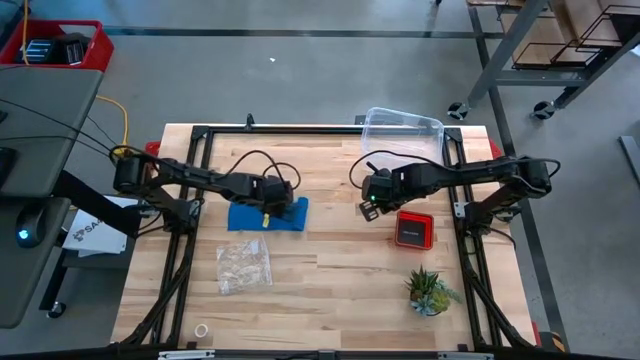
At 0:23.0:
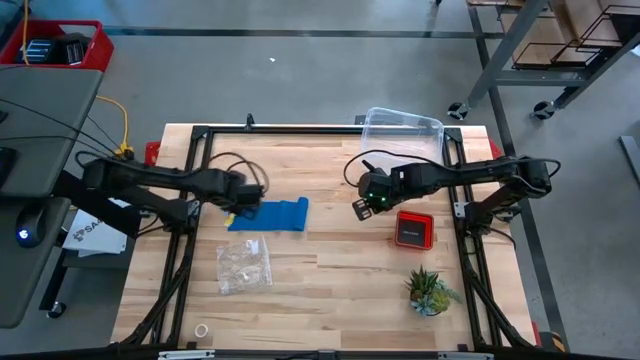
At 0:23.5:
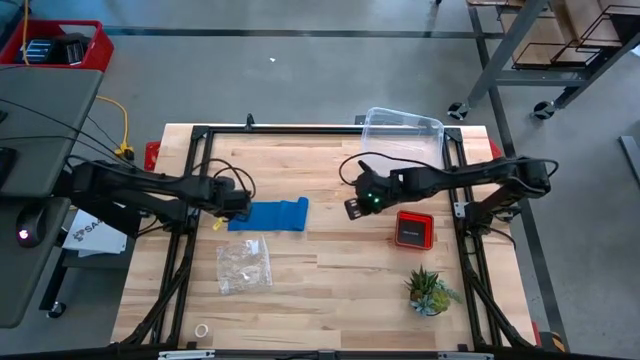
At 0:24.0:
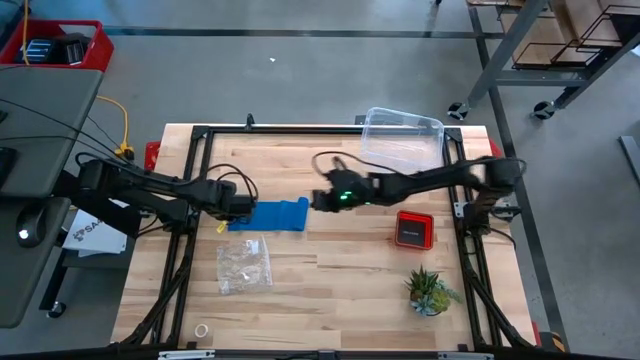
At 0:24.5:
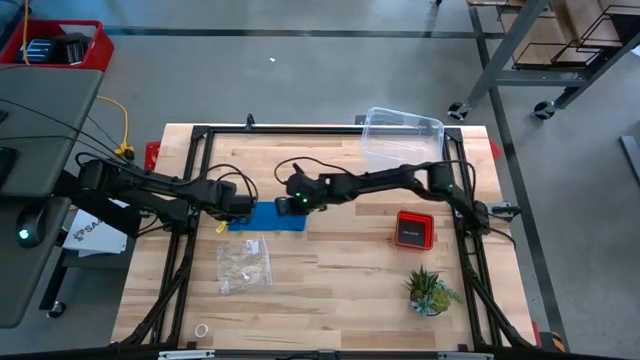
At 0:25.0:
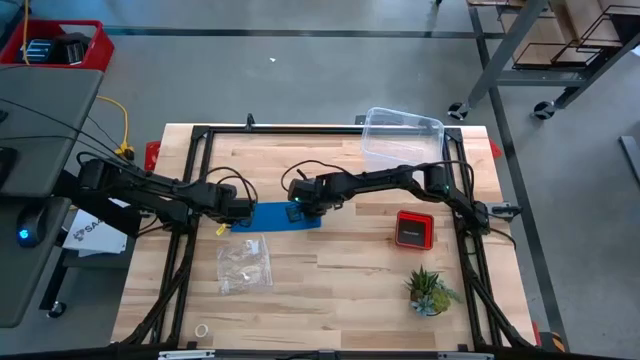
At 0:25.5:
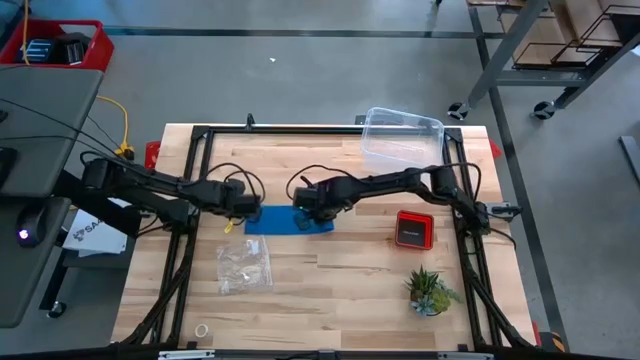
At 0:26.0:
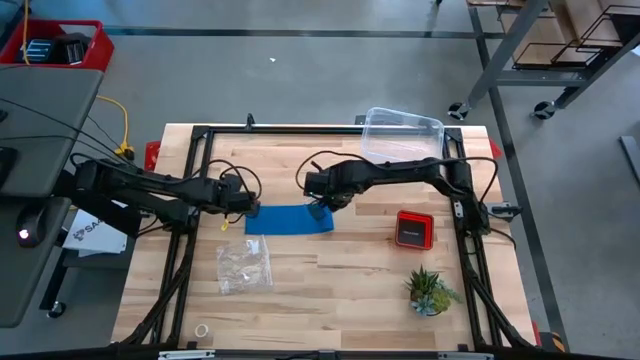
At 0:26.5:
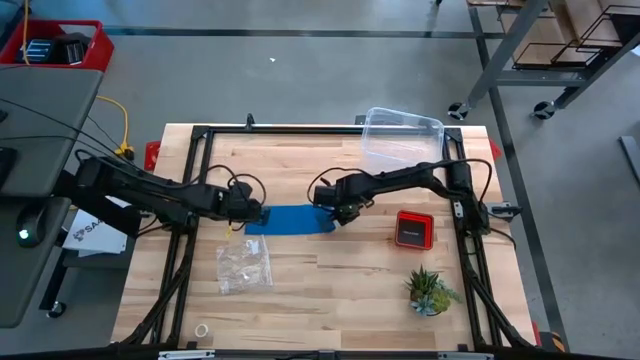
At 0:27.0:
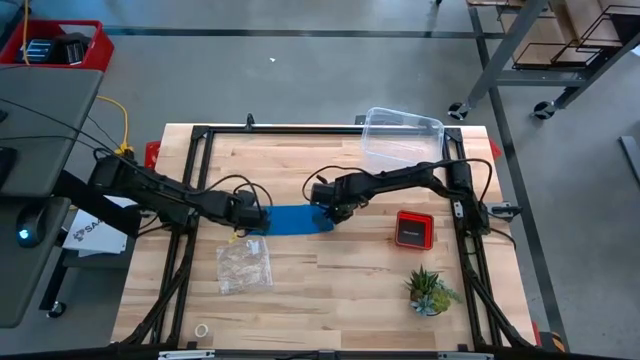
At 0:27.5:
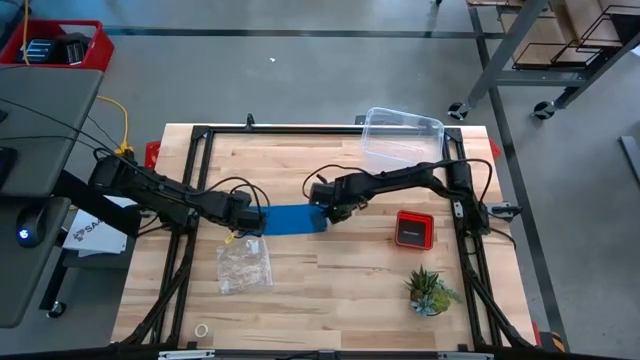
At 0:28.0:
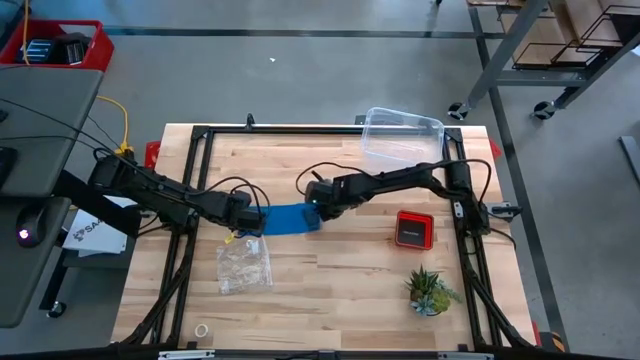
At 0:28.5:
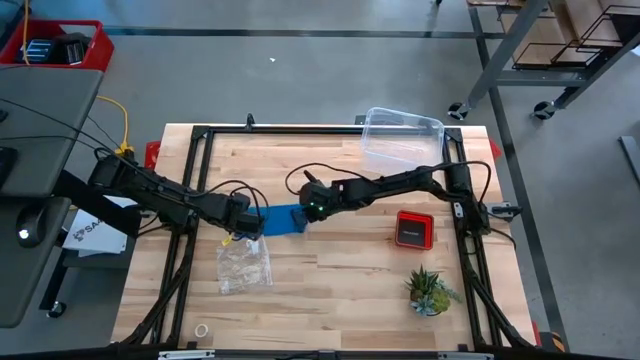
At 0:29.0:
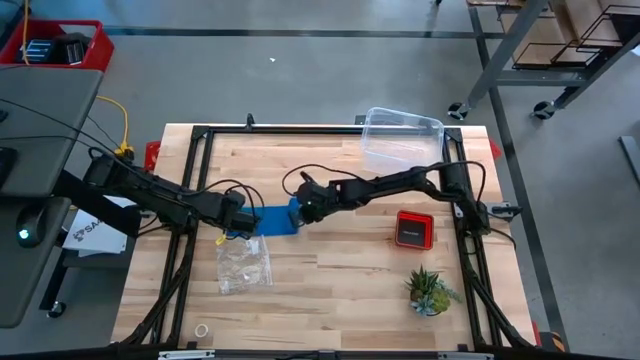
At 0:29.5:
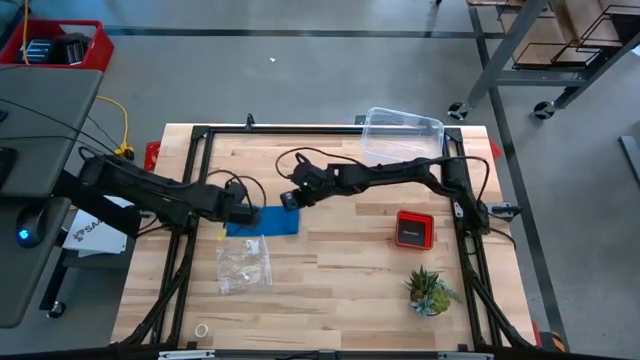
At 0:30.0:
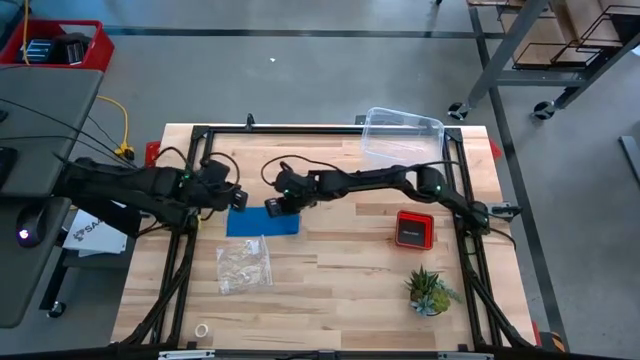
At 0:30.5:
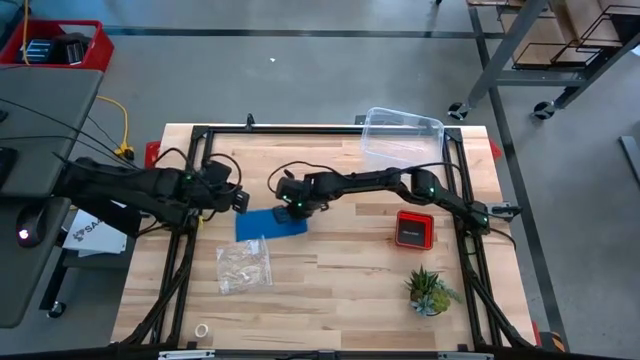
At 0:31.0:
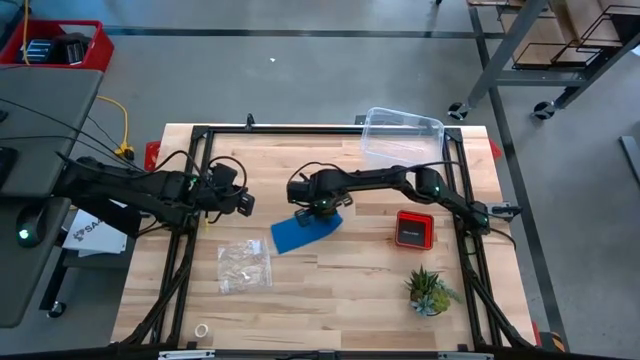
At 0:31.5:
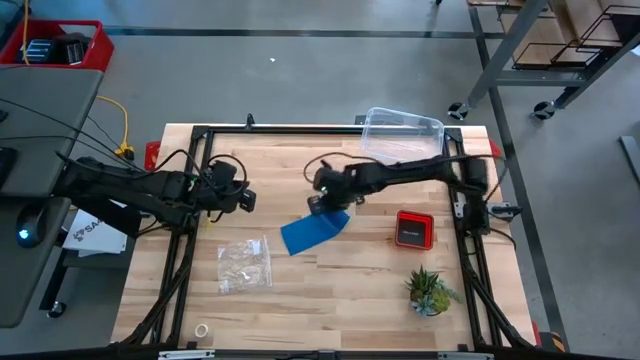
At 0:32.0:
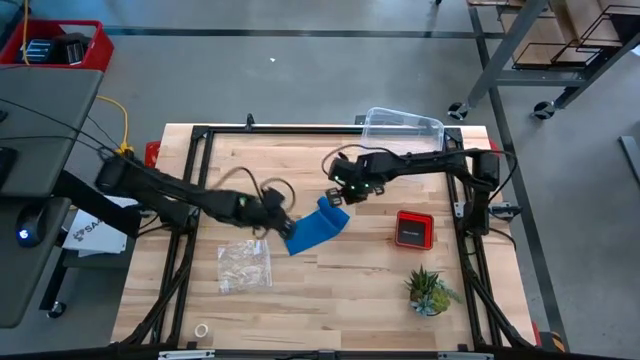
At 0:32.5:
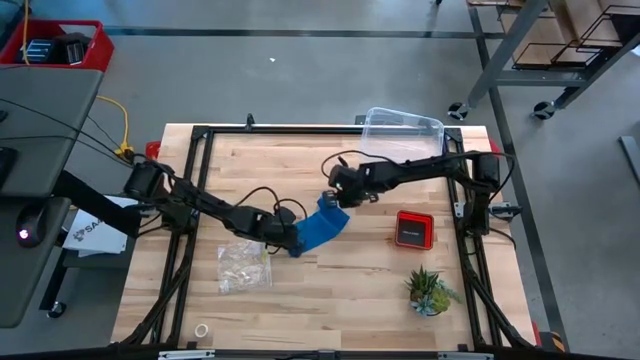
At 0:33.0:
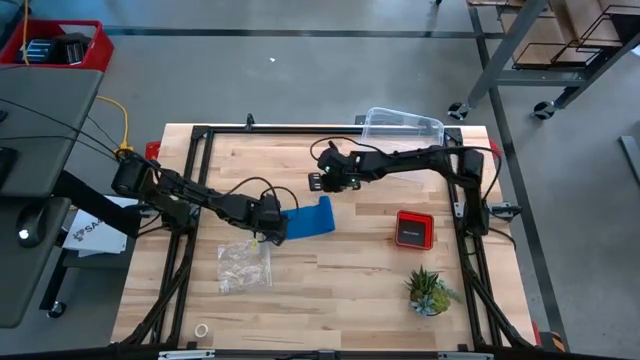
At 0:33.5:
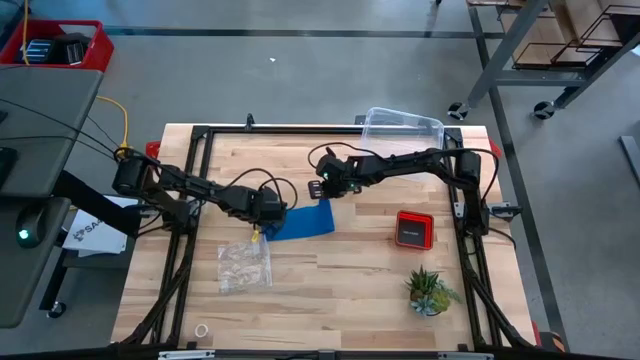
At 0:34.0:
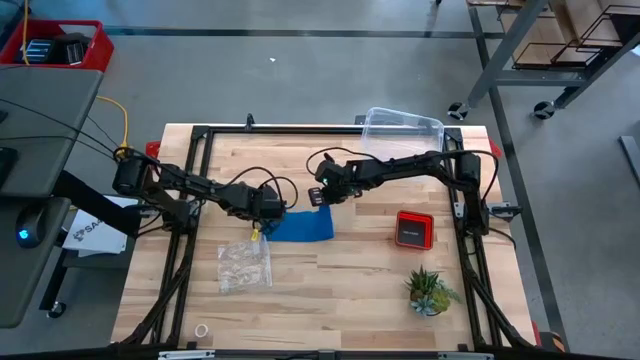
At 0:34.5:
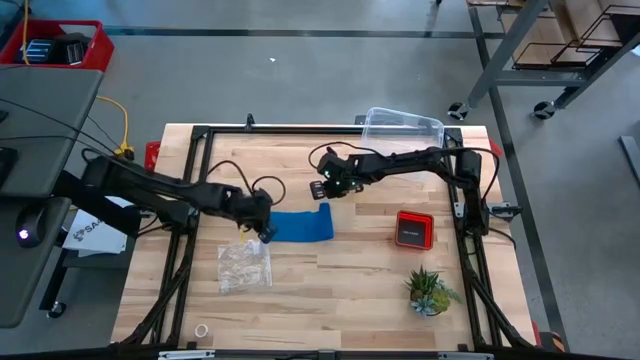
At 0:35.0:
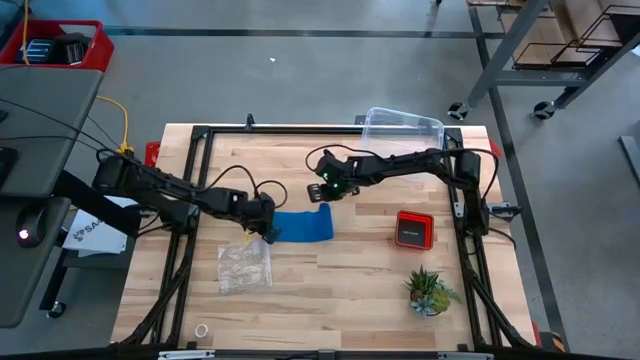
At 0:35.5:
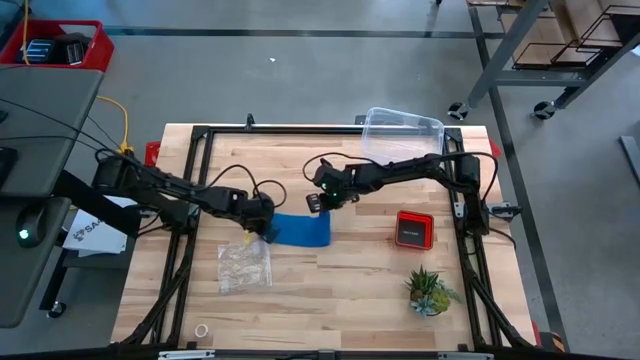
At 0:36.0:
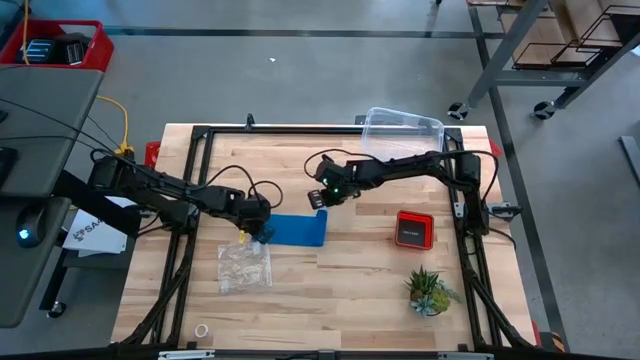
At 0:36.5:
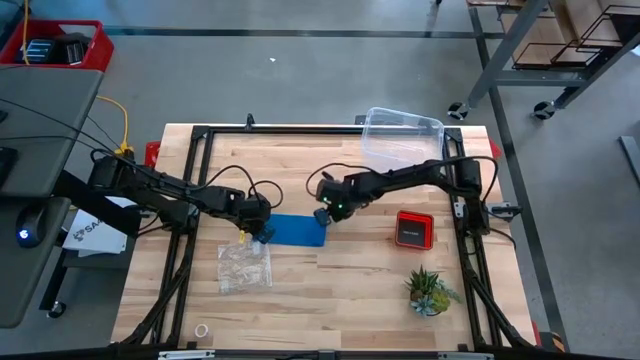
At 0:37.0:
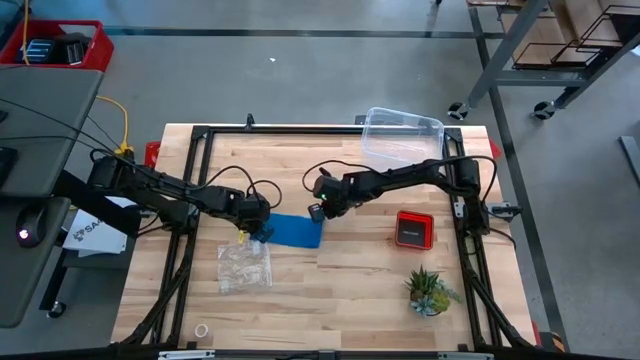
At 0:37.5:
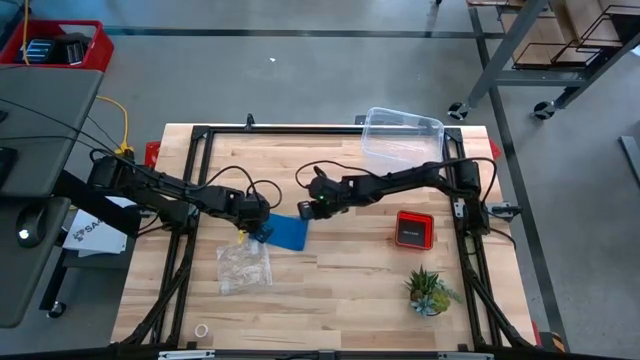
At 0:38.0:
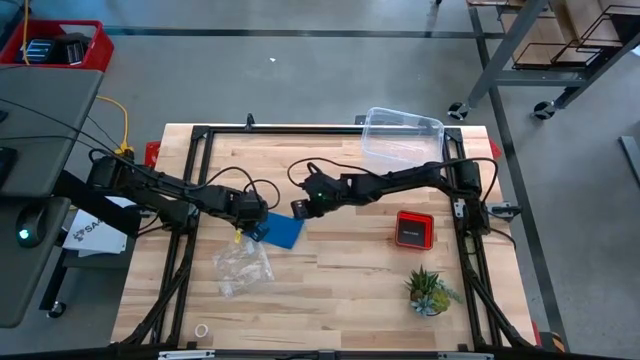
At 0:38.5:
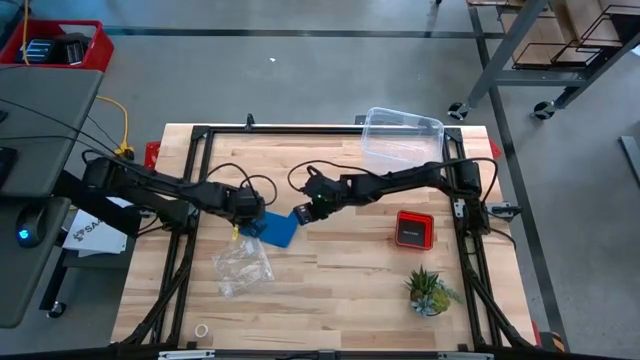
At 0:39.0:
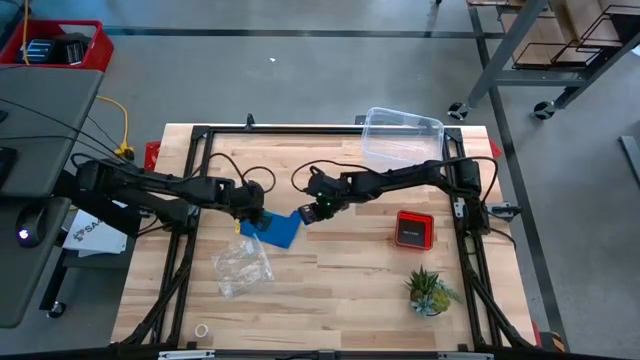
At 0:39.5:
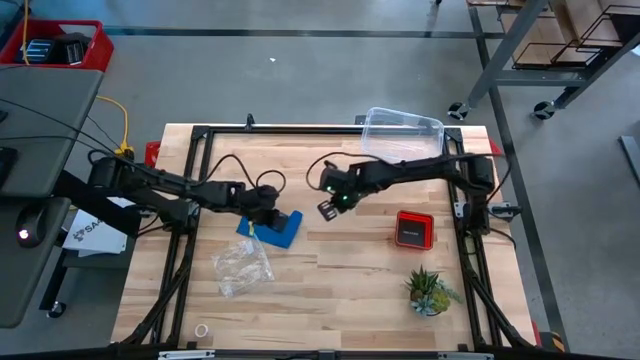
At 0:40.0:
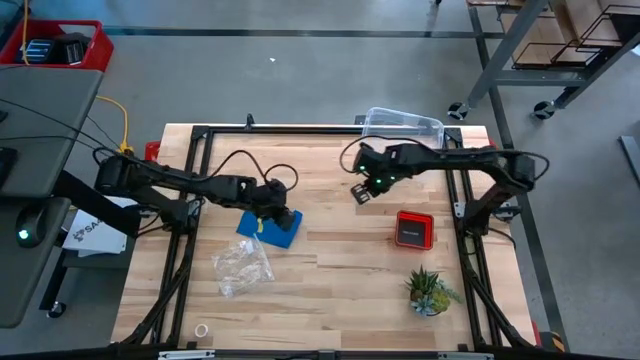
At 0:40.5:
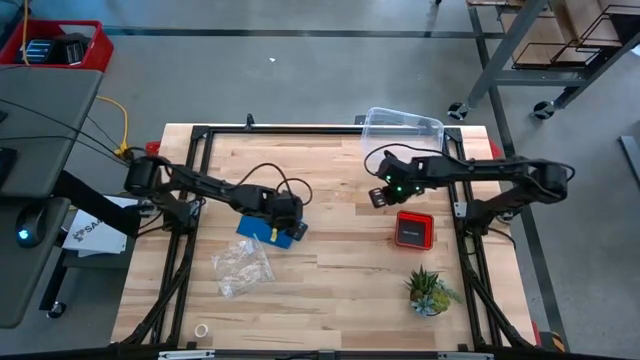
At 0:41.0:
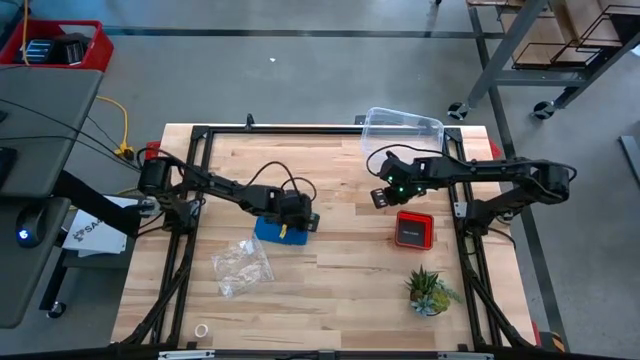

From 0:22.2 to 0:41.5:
Task: Roll bandage
Roll the blue bandage

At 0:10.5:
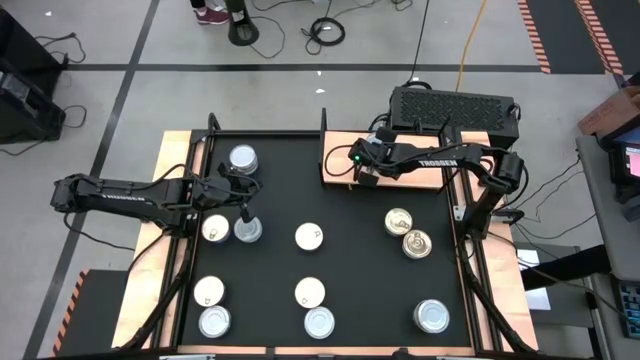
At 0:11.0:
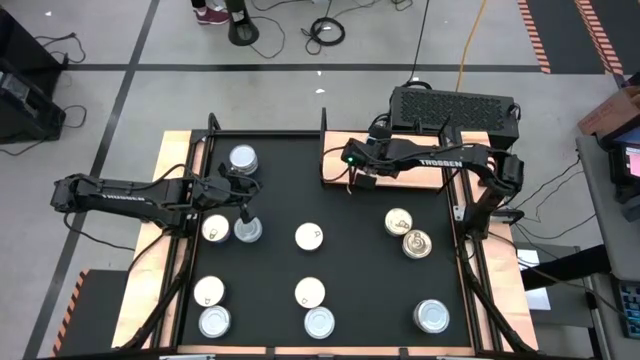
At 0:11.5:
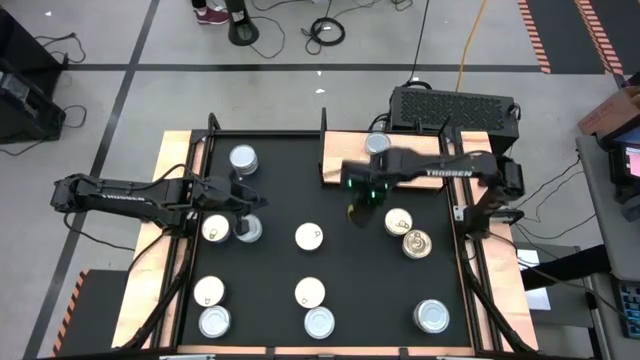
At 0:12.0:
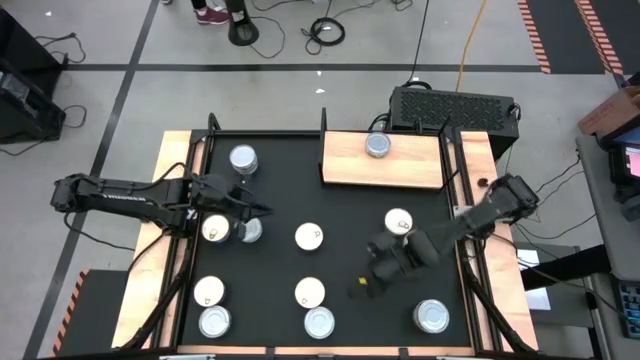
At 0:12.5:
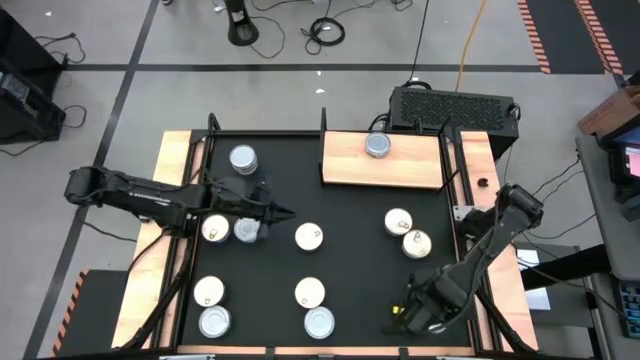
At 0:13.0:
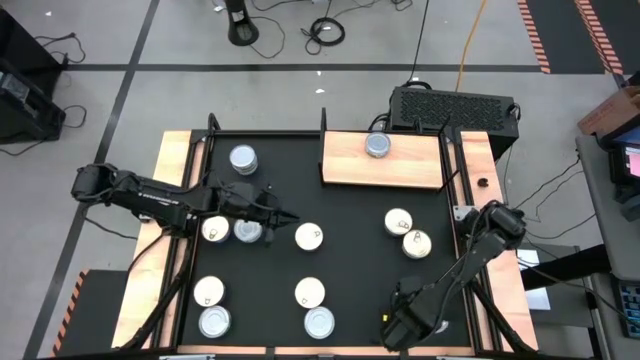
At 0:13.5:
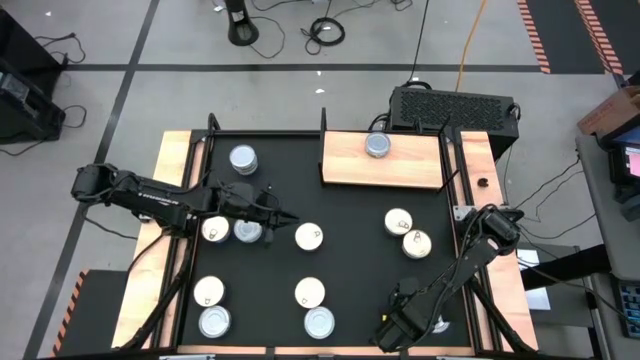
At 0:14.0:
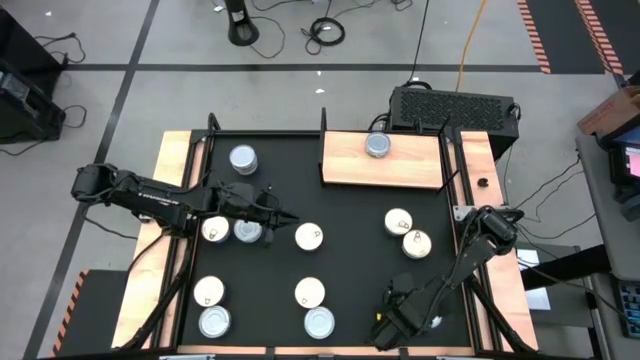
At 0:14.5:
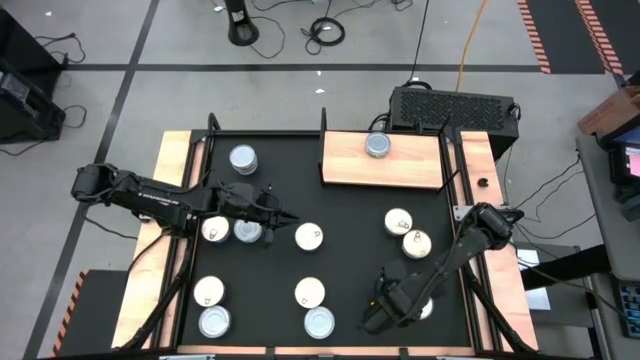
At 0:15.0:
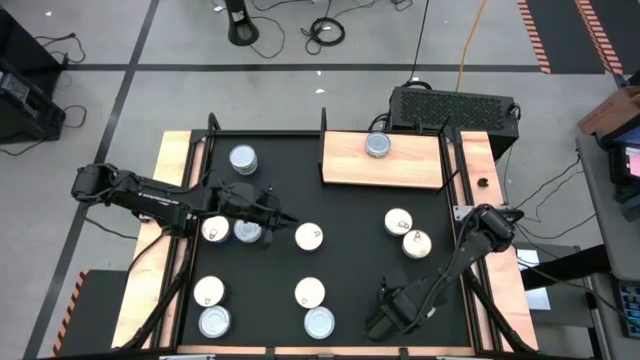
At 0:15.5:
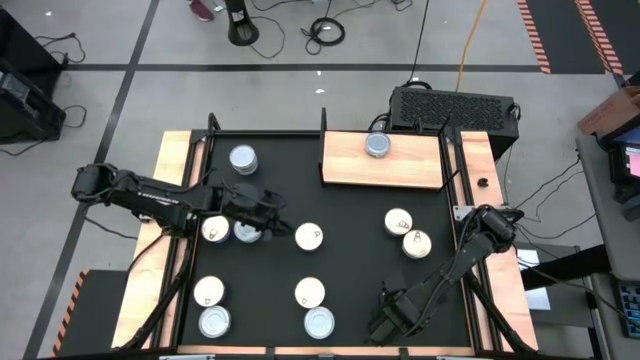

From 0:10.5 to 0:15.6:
Task: Stack canned seafood by type on shelf
Put the green tuna can on the shelf
